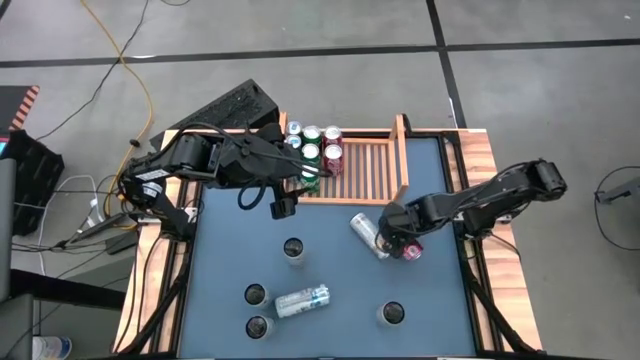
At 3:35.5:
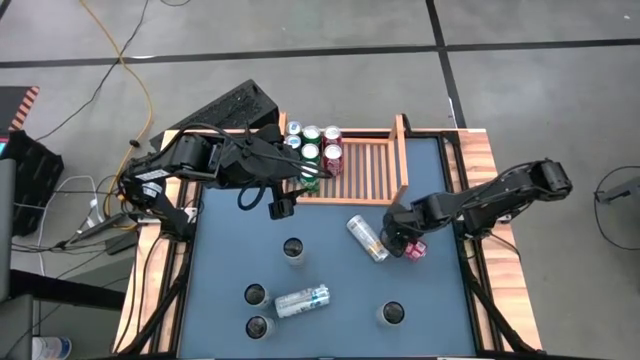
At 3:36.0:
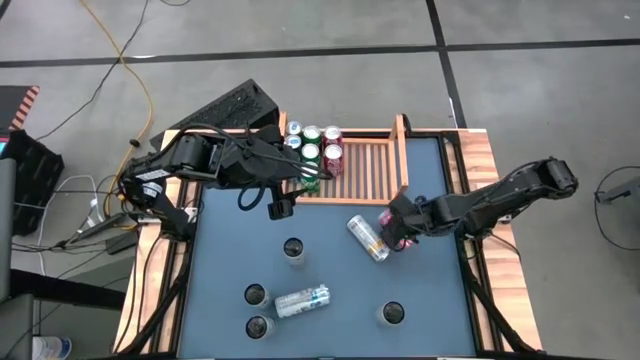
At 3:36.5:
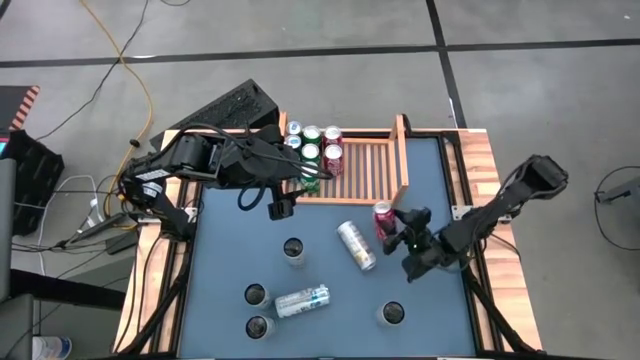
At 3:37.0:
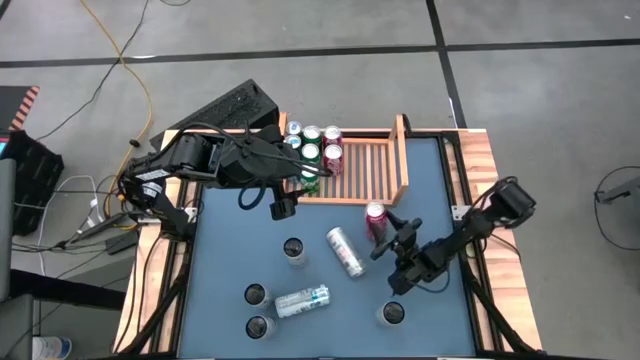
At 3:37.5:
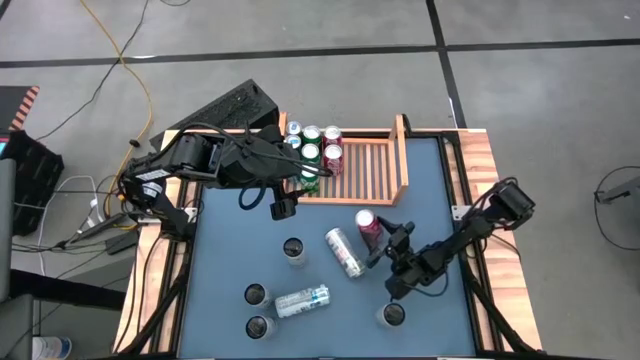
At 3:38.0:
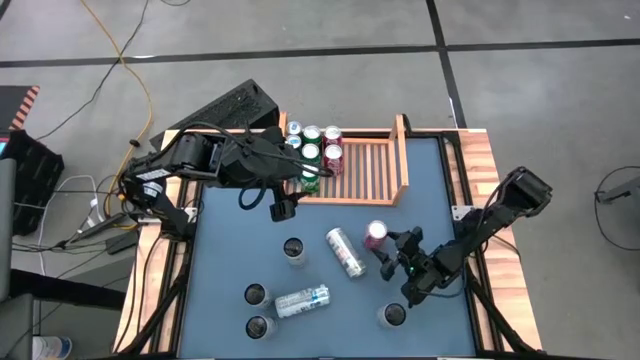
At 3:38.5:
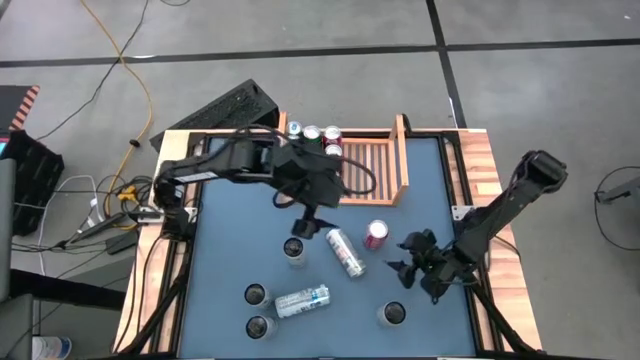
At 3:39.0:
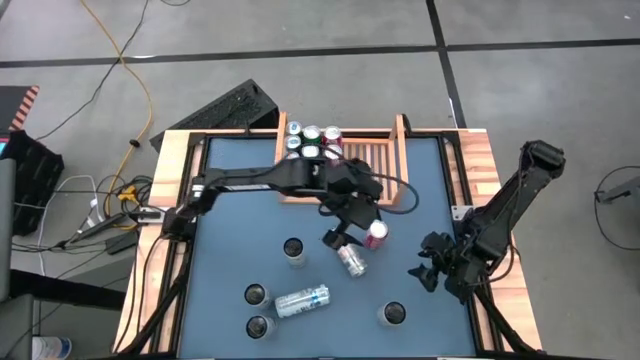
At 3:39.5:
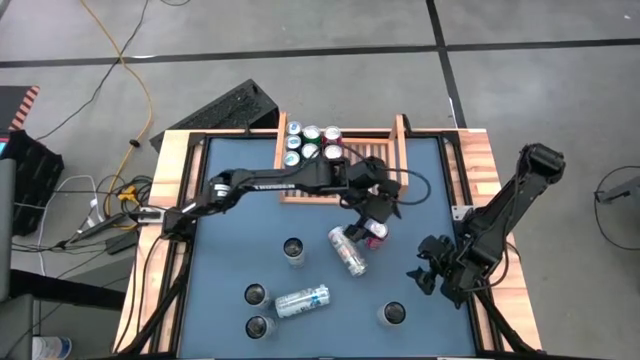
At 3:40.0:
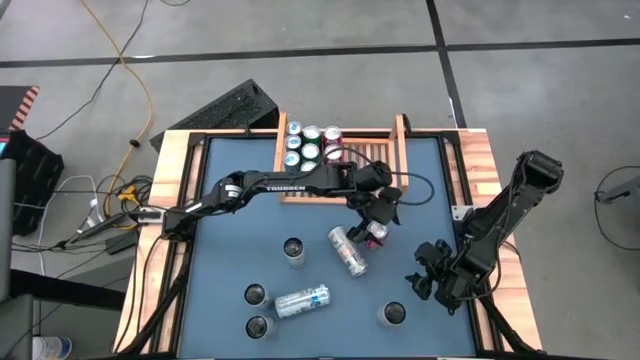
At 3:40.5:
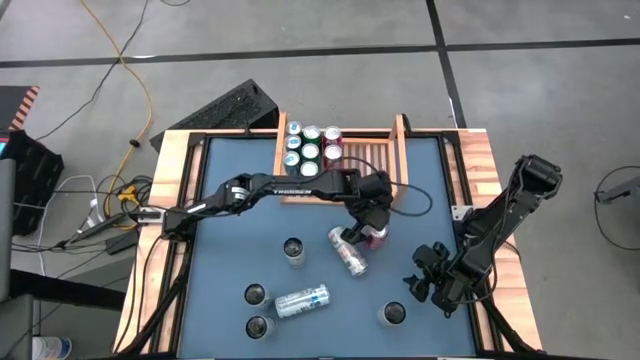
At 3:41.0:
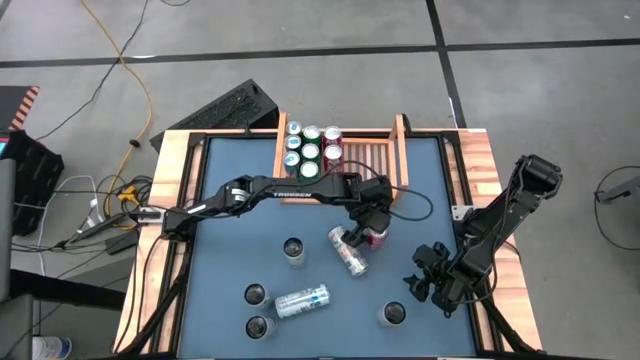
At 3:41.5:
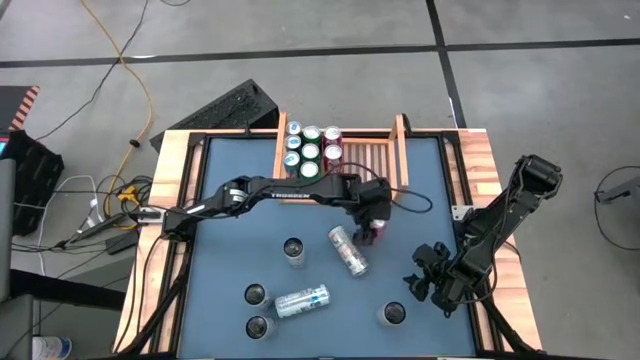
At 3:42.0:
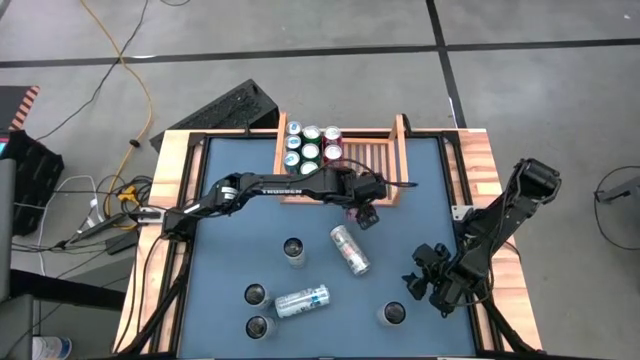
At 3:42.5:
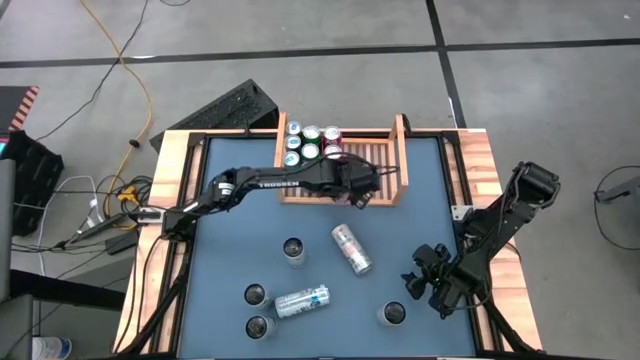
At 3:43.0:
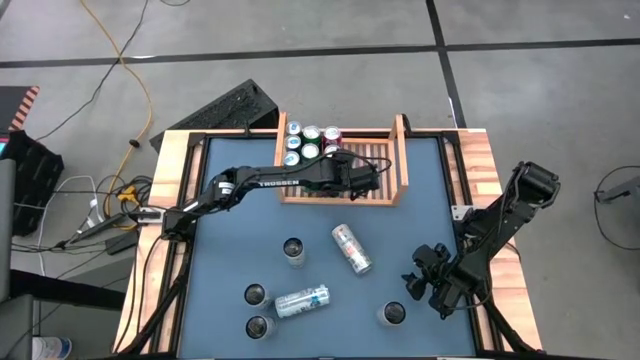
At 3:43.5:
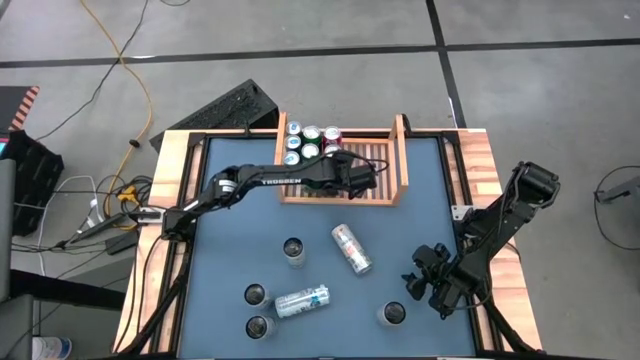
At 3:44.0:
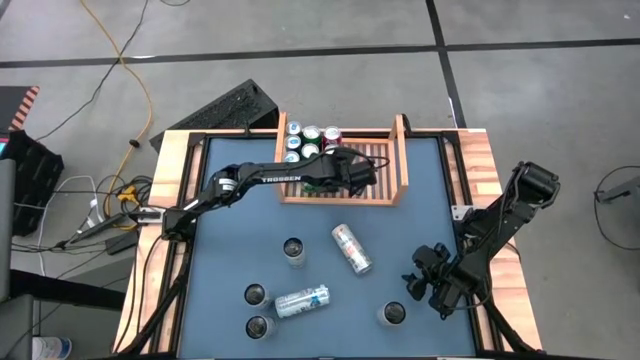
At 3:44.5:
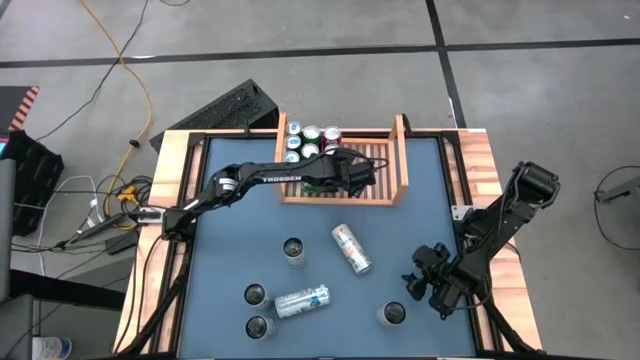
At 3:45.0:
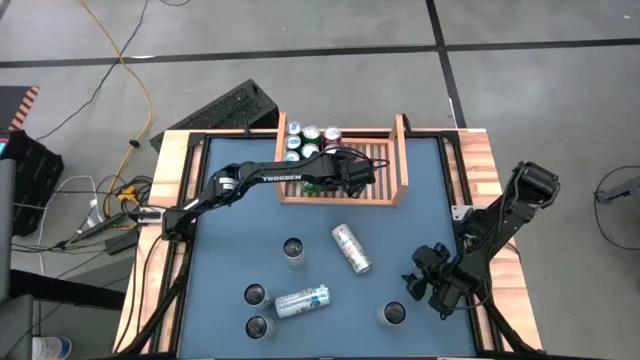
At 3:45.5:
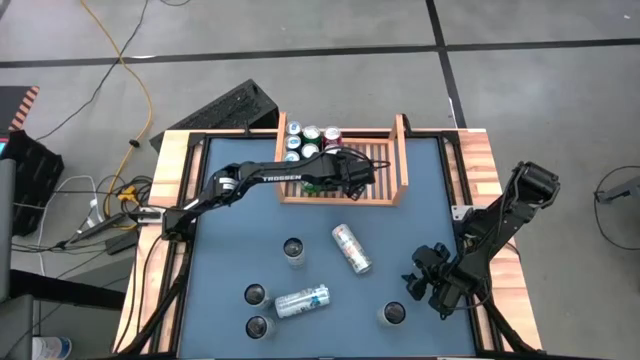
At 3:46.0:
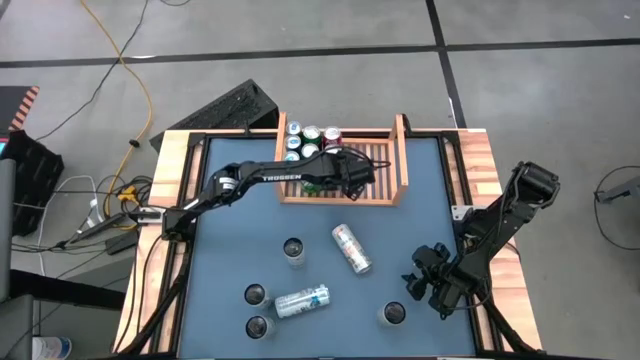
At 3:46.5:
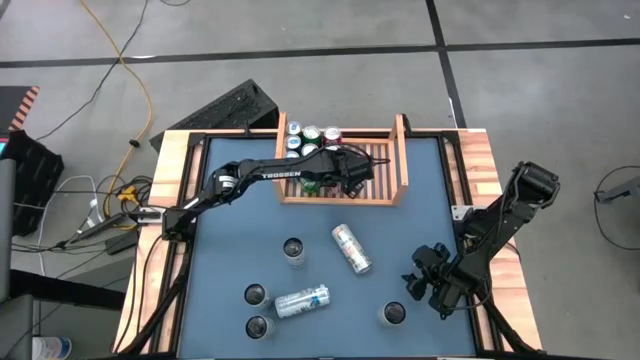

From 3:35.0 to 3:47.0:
Task: Place canned beverage on shelf
Put the red soda can on the shelf

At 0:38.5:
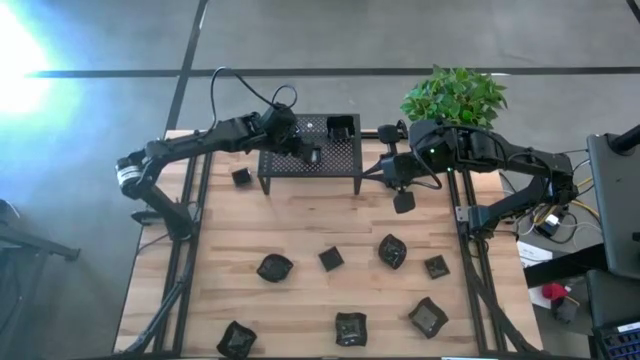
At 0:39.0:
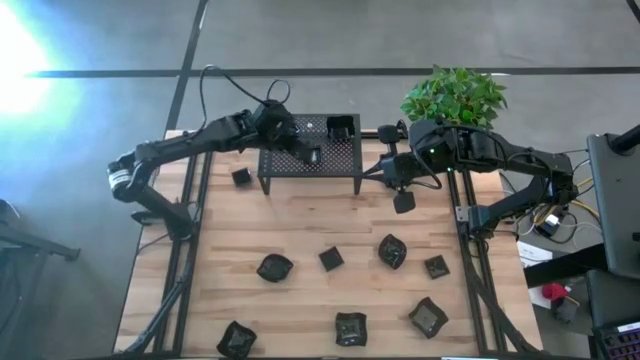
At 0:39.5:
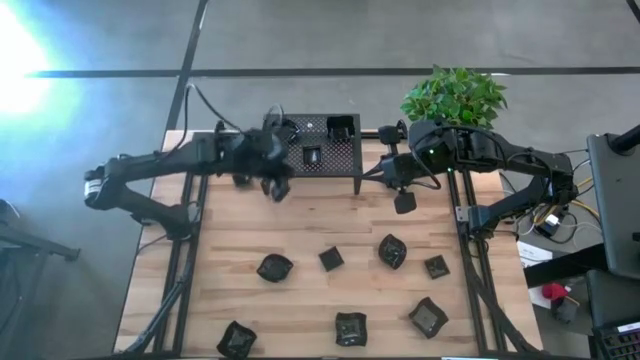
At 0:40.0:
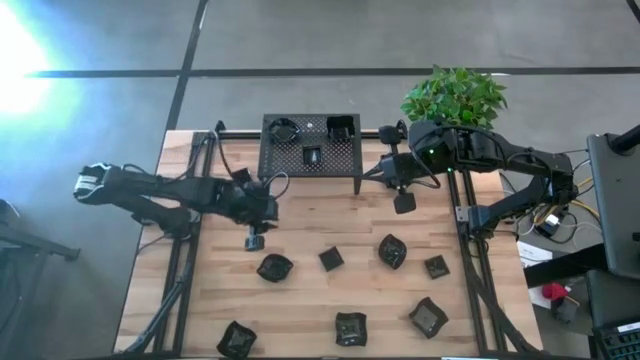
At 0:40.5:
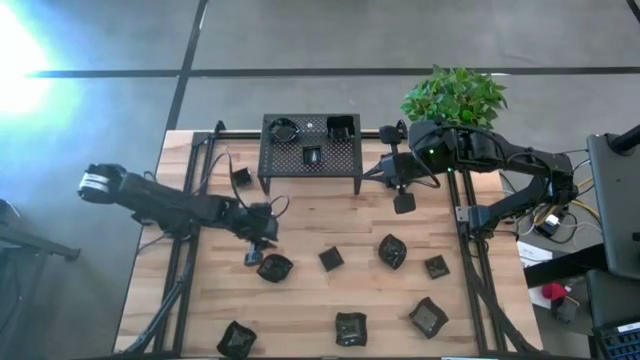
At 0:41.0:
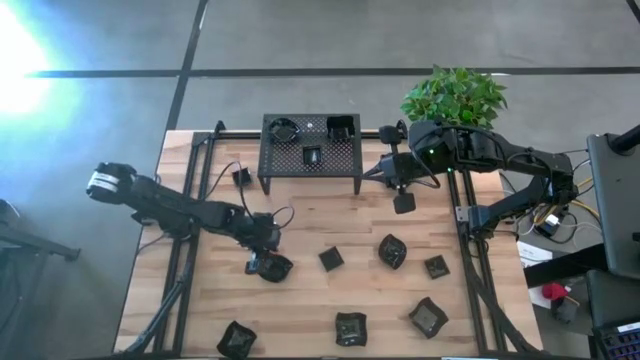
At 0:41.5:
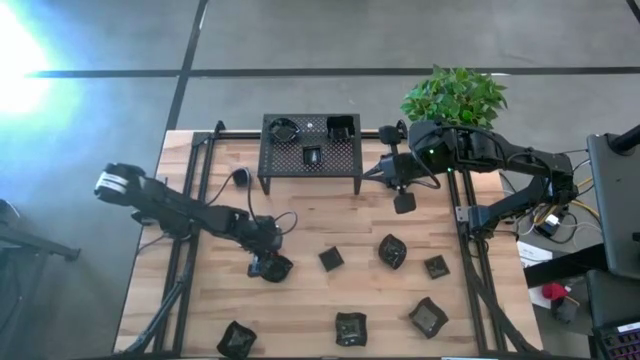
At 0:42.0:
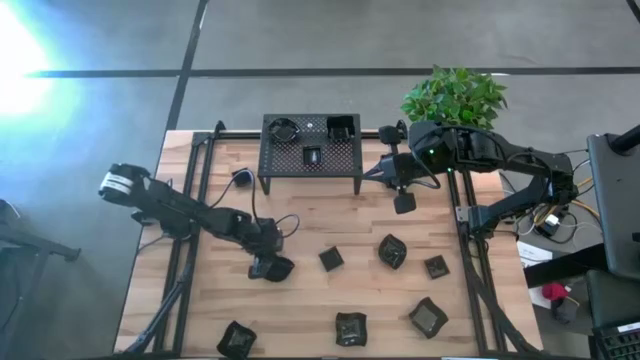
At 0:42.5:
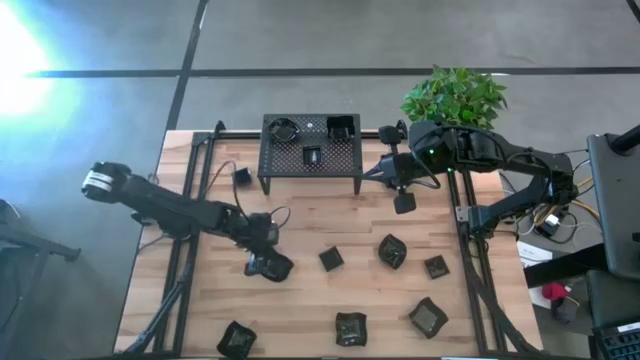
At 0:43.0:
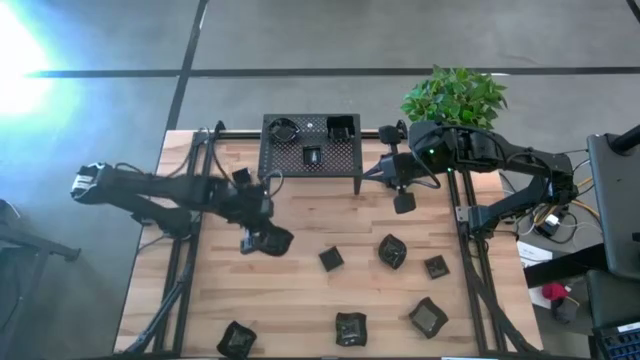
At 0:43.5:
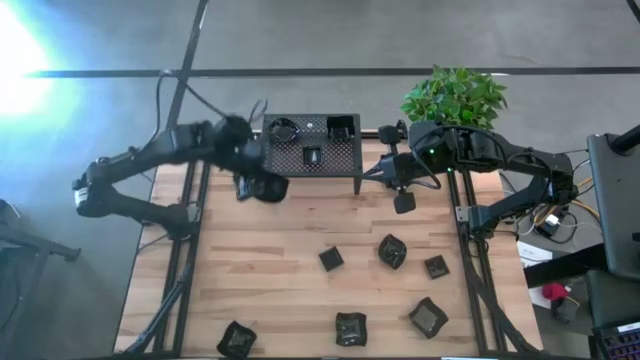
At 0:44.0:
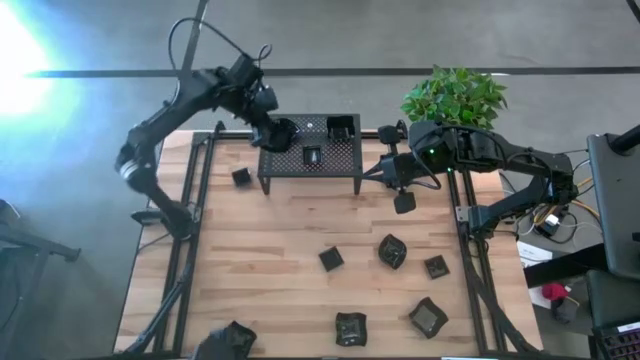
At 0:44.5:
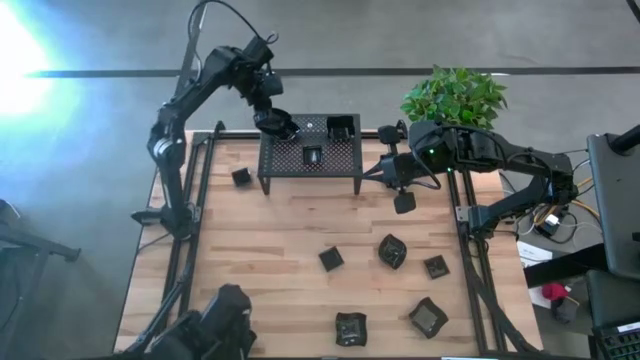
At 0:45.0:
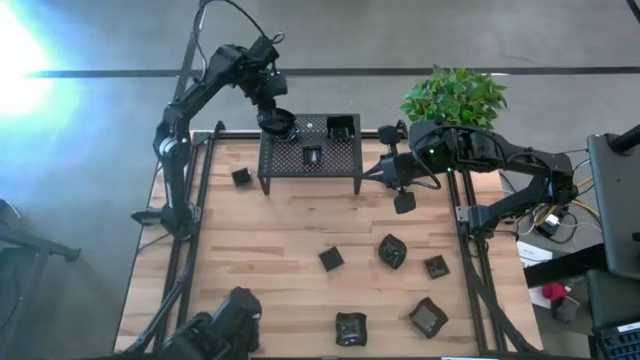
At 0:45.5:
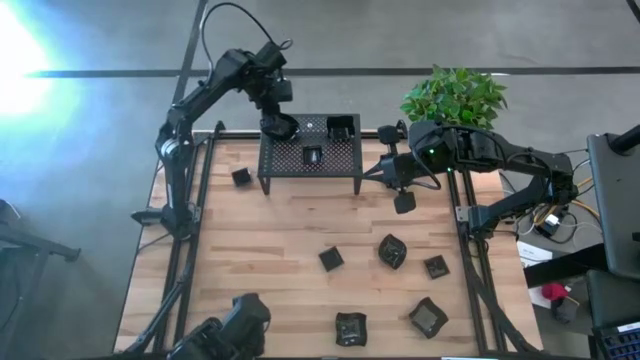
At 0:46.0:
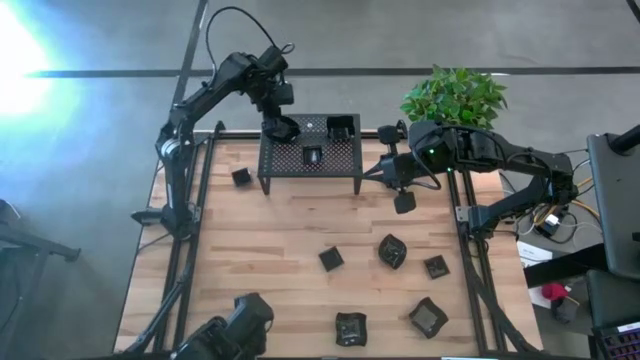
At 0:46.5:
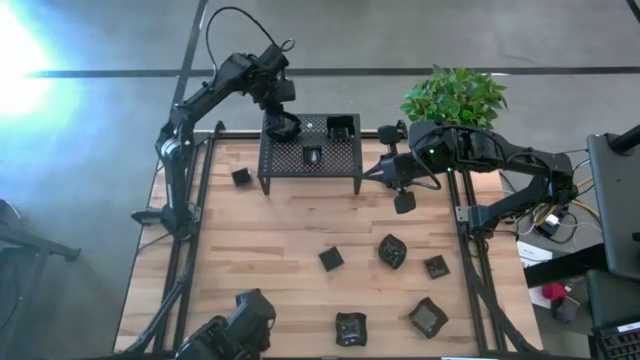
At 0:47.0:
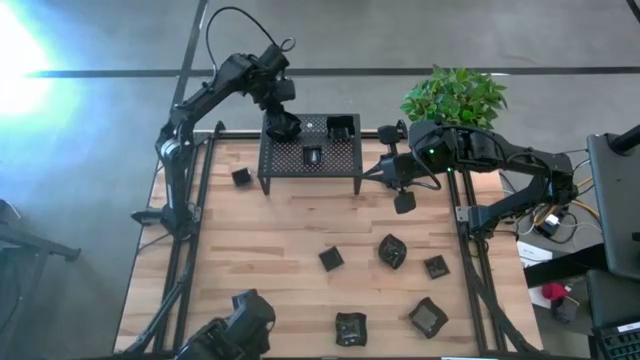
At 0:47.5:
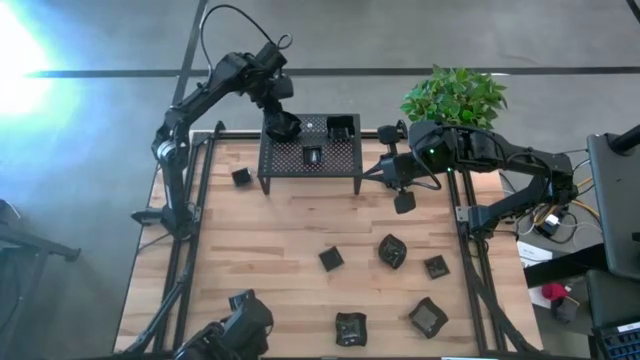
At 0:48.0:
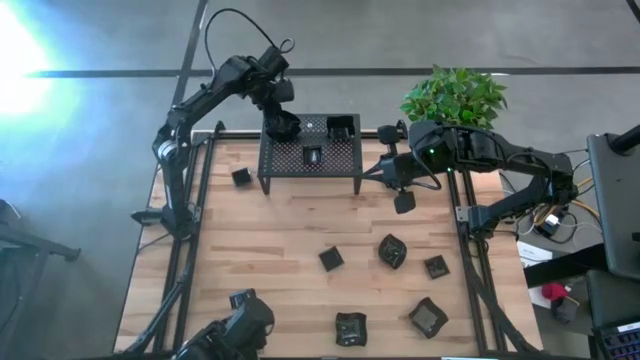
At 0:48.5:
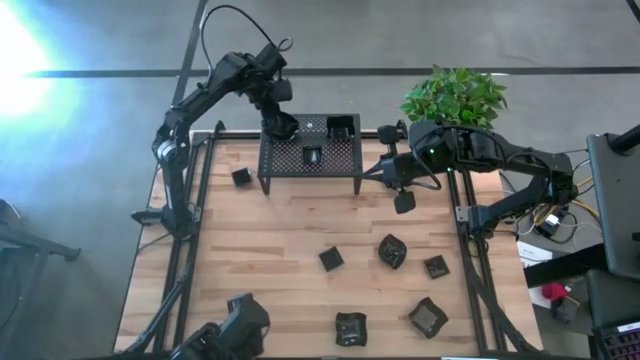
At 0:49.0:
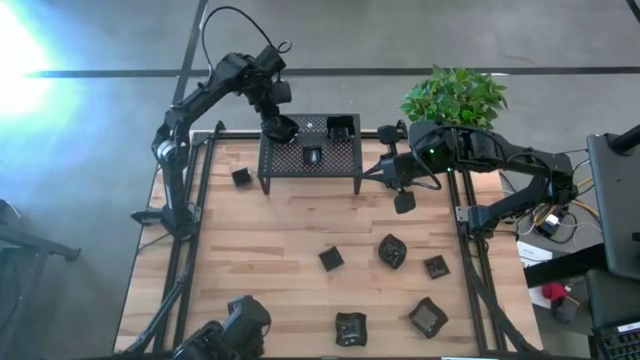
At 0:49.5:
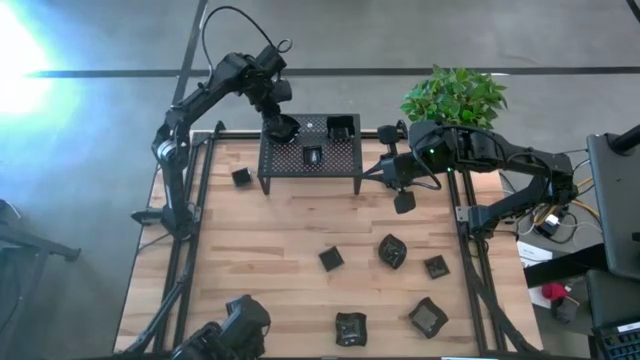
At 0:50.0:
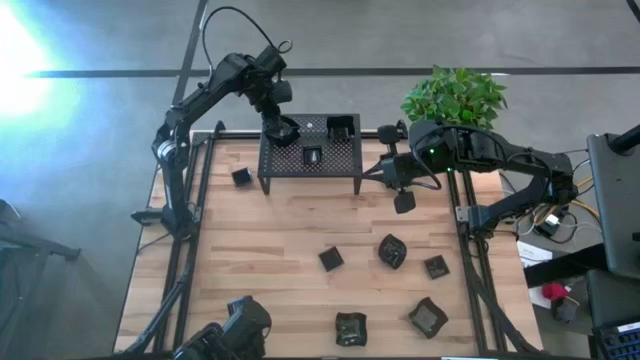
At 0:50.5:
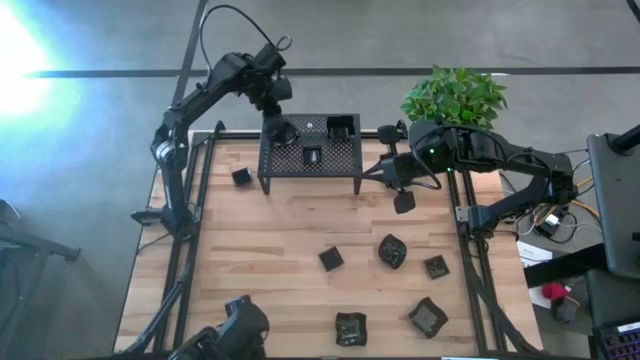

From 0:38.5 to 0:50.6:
Task: Pick & Place Mini shaped plates
Put the leaf shaped plate on top of the leaf shaped plate on the shelf
